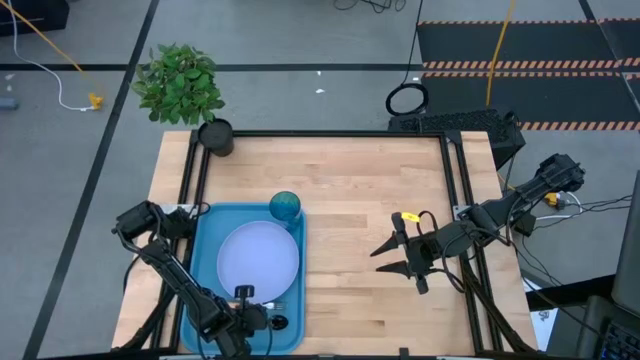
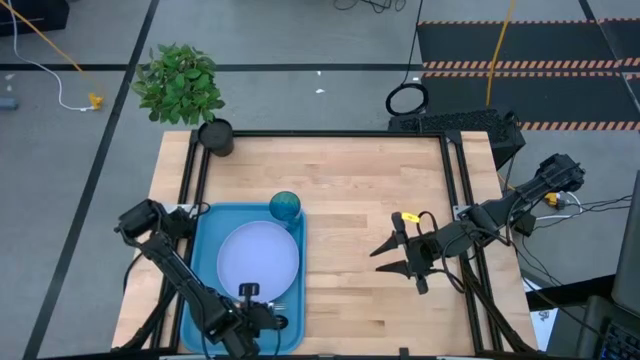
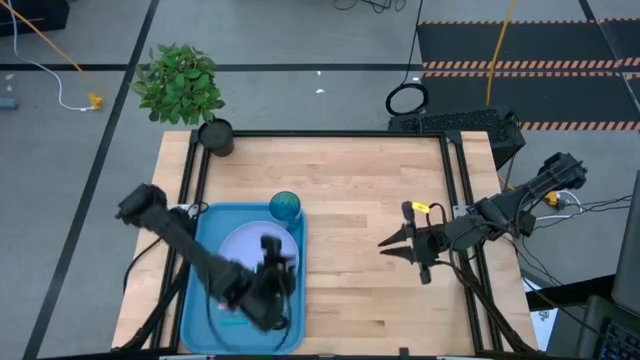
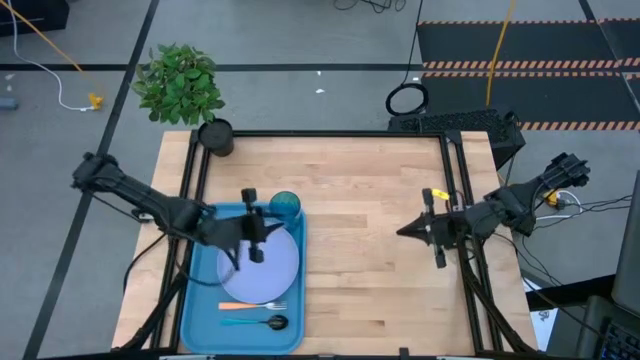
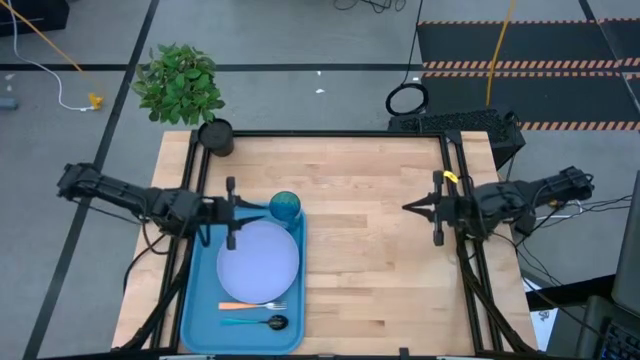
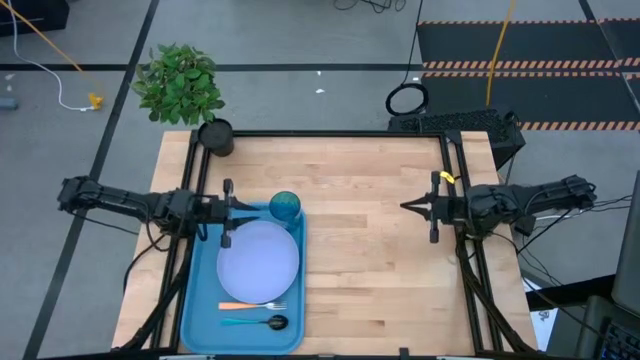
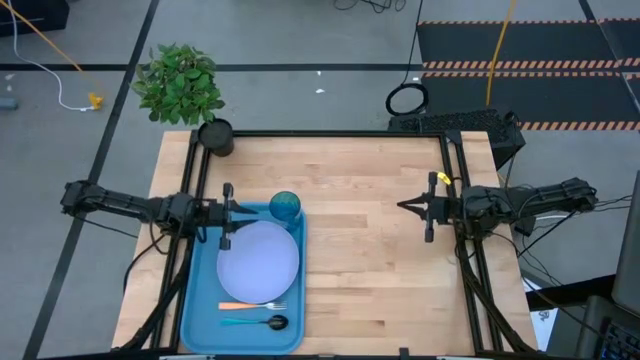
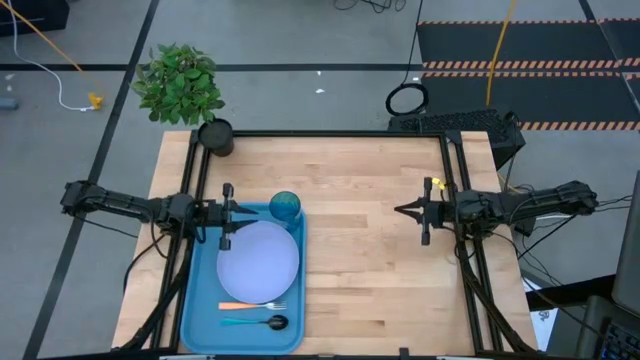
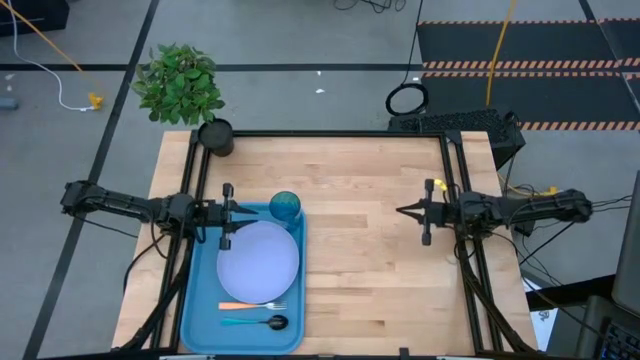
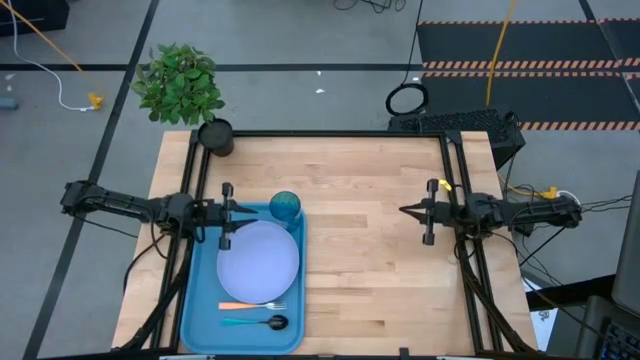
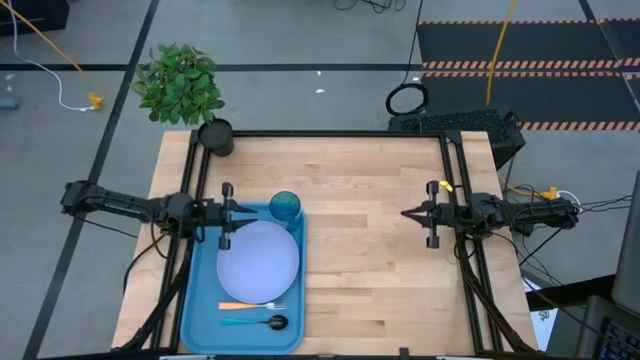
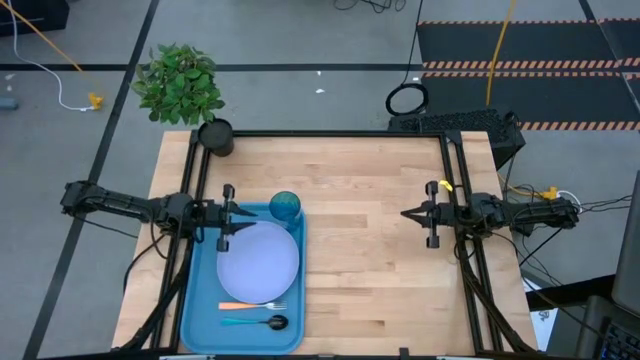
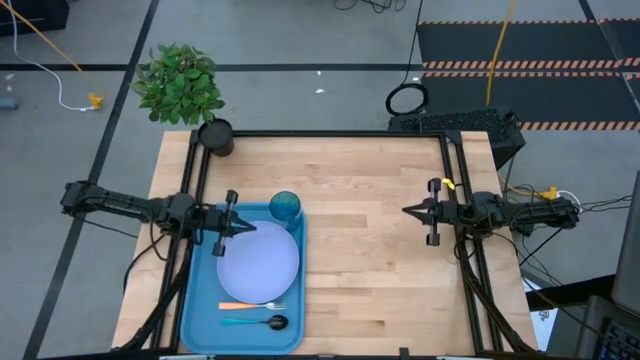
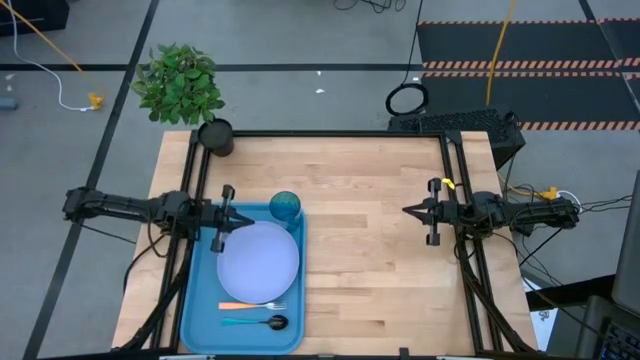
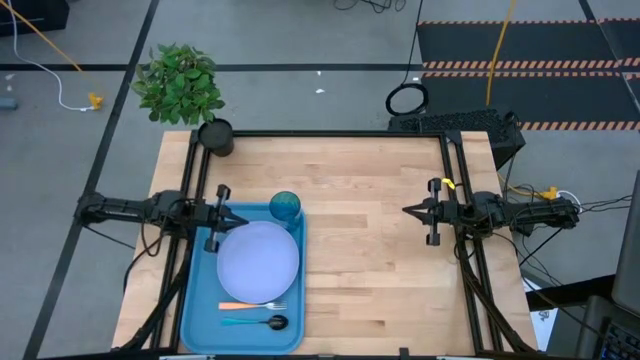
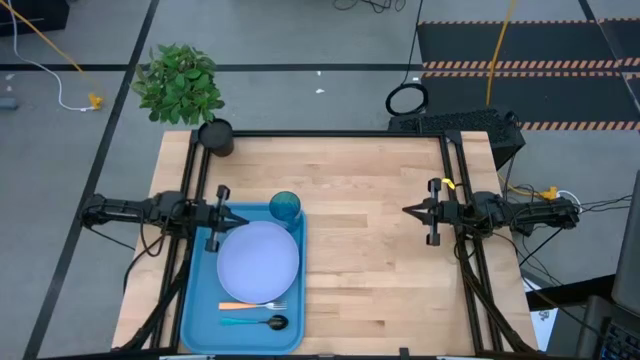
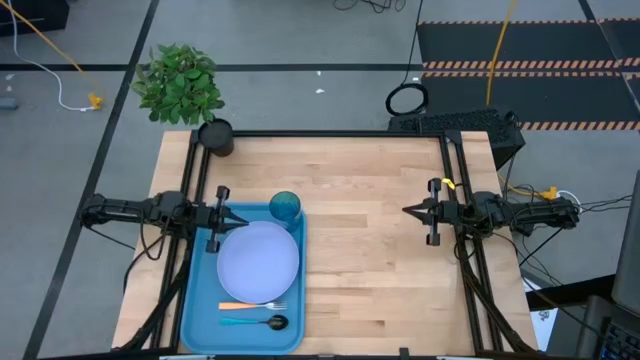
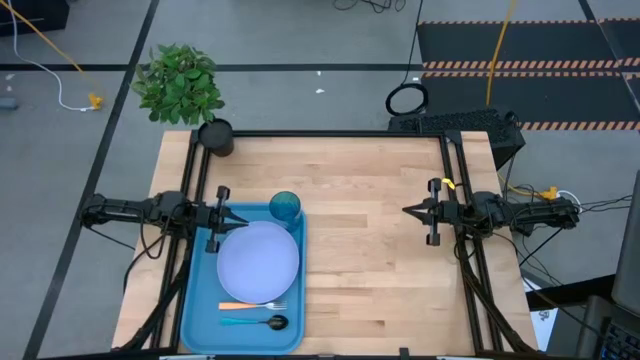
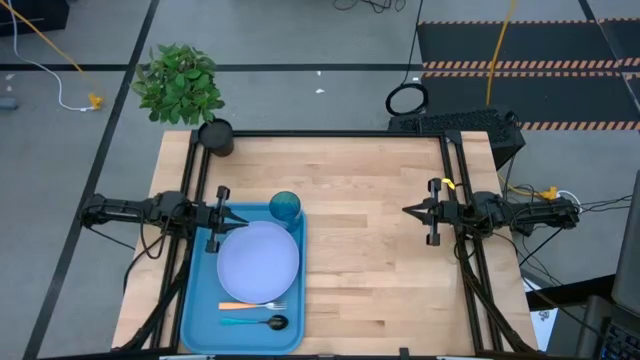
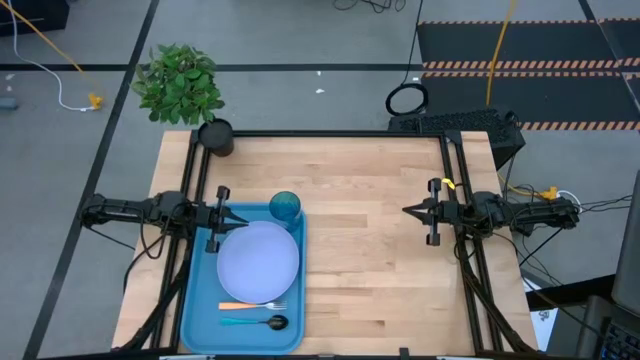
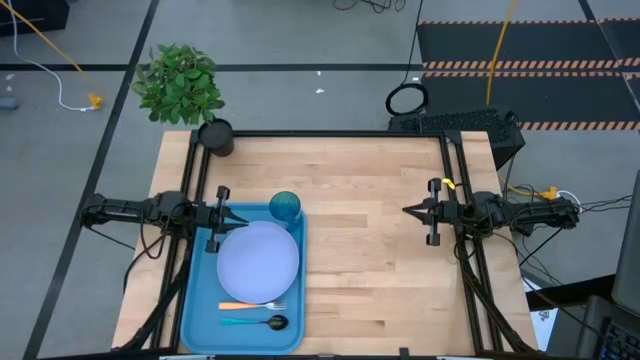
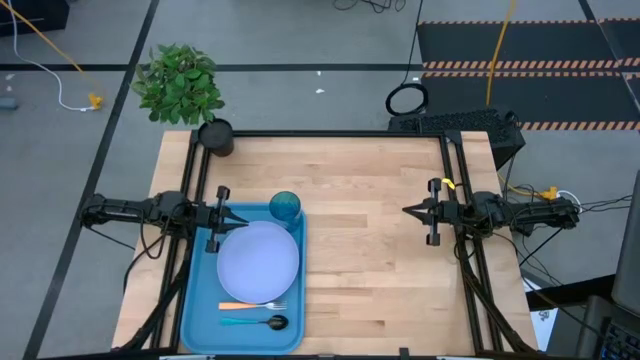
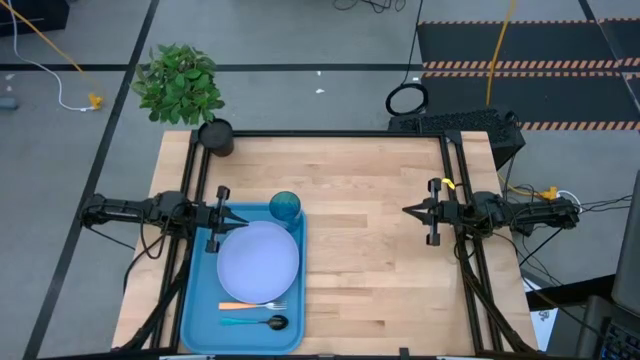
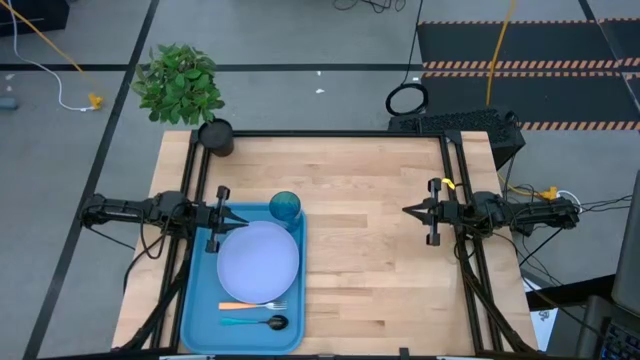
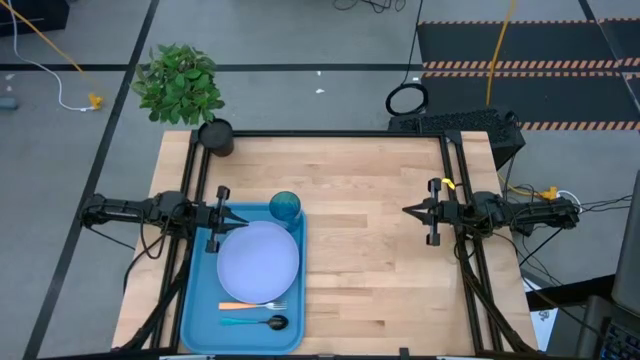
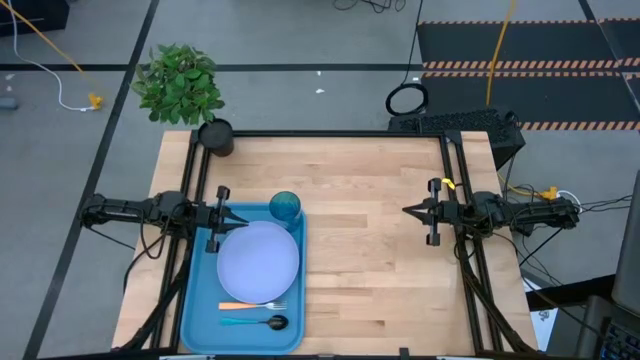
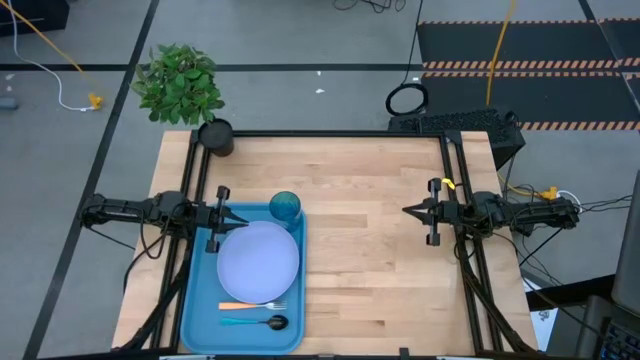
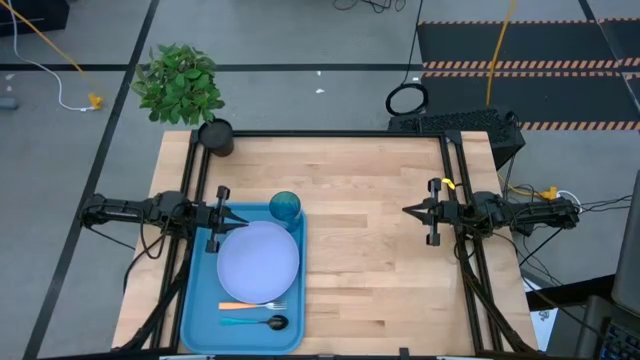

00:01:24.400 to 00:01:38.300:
Task: Pick and place plate/cup/fork/spoon on tray
Return to Home Position

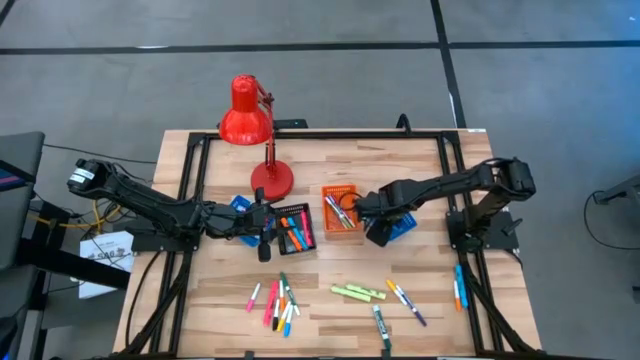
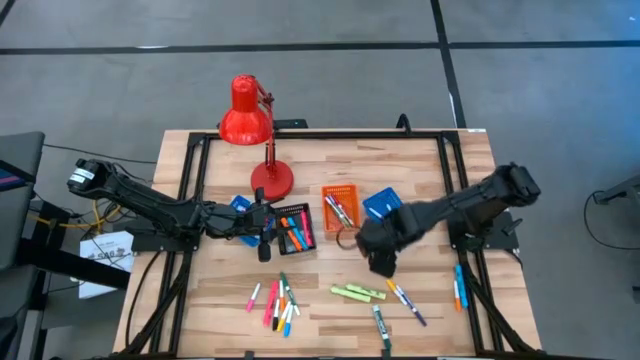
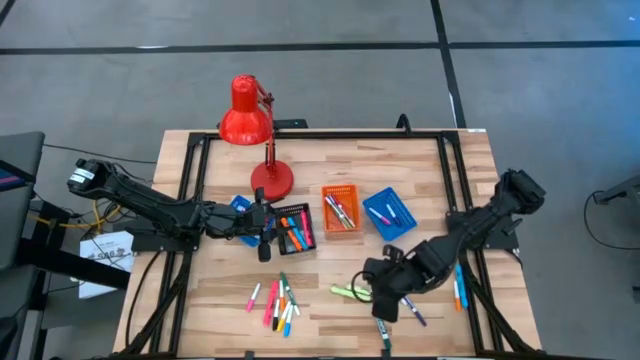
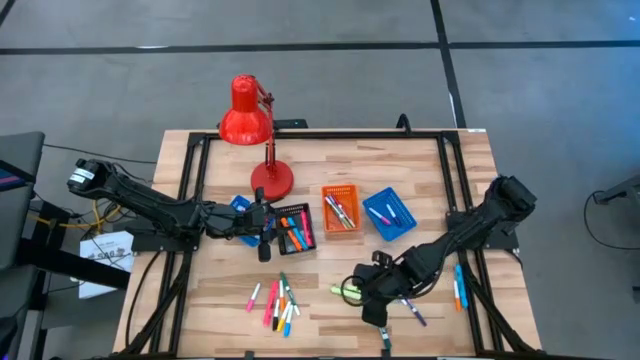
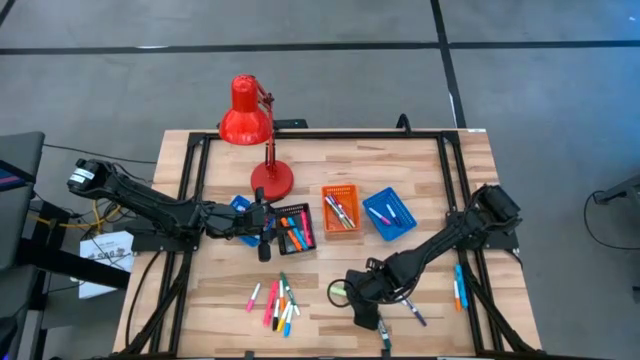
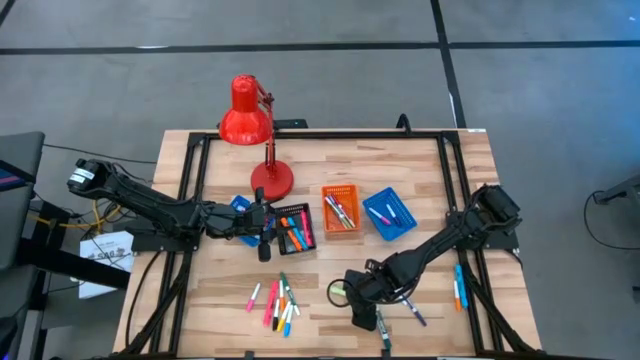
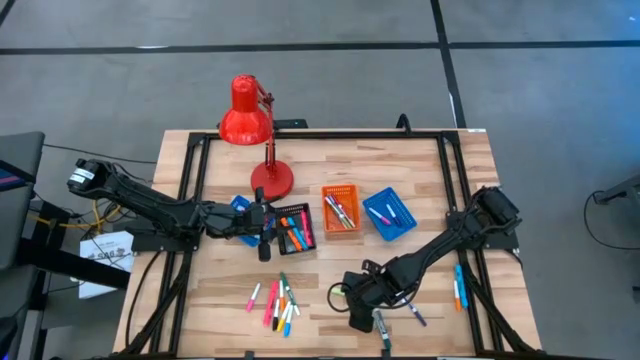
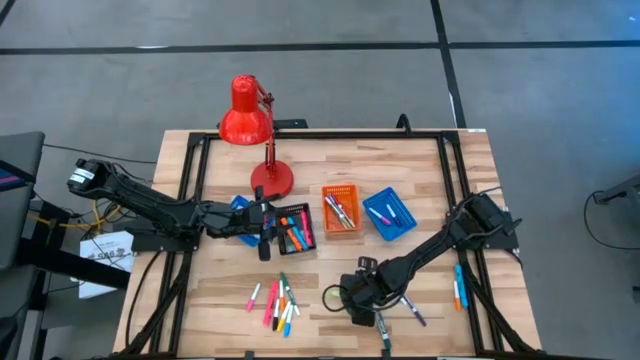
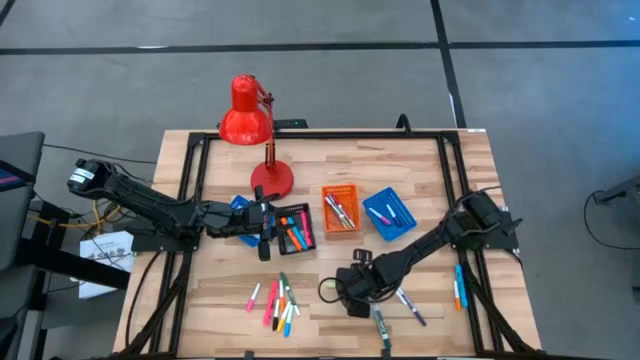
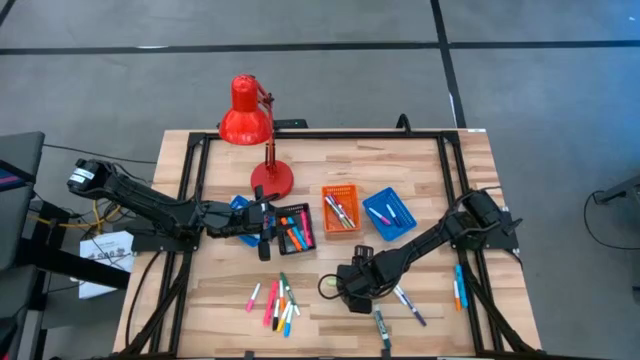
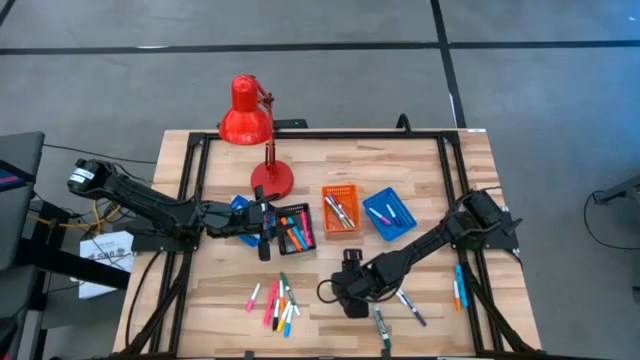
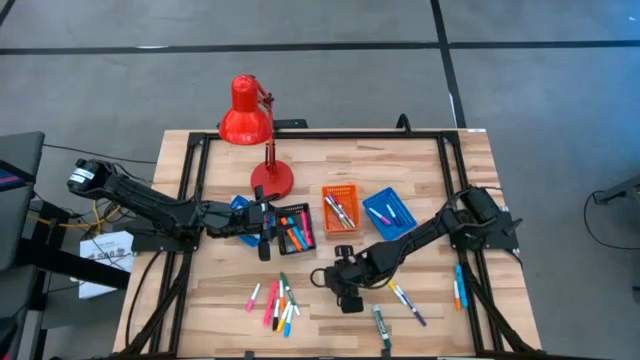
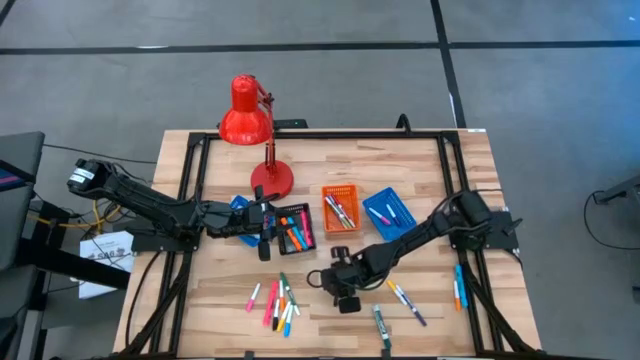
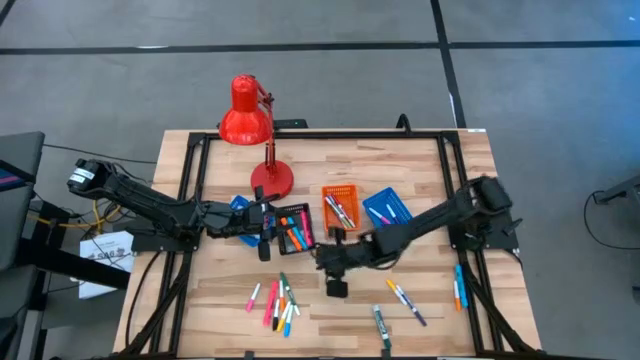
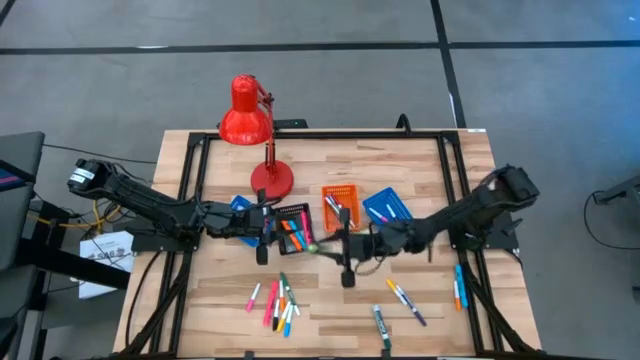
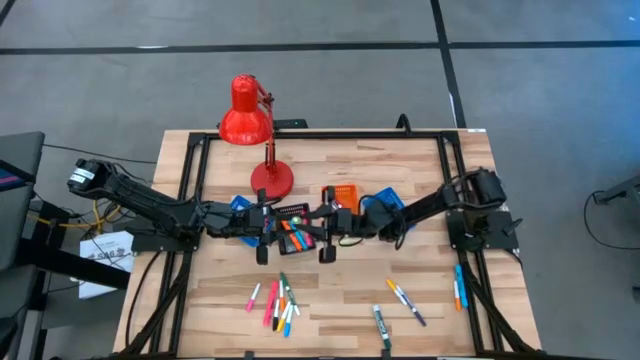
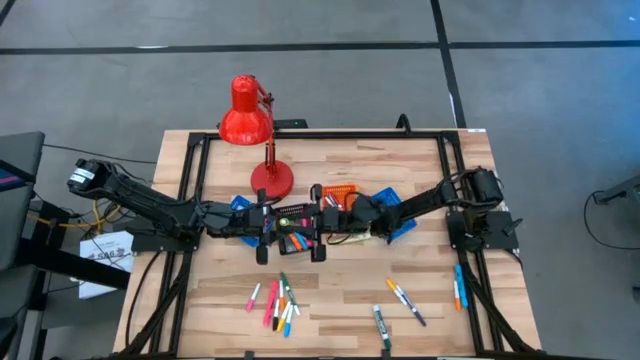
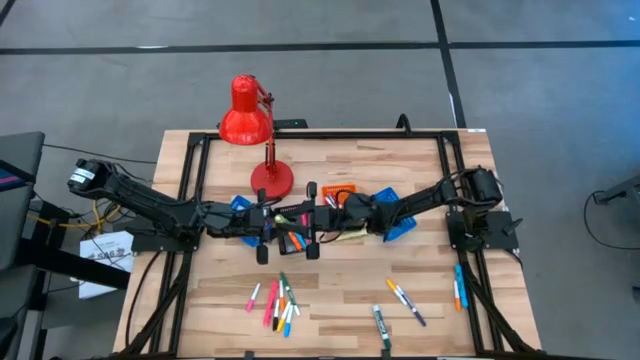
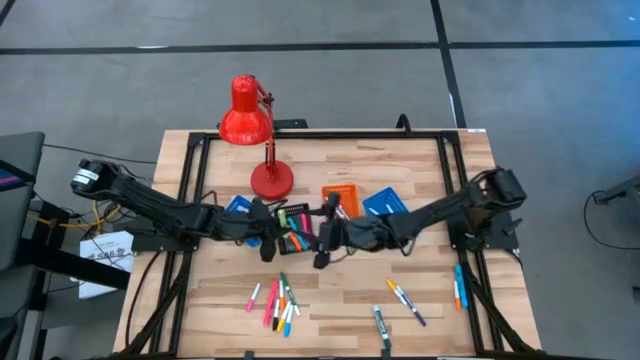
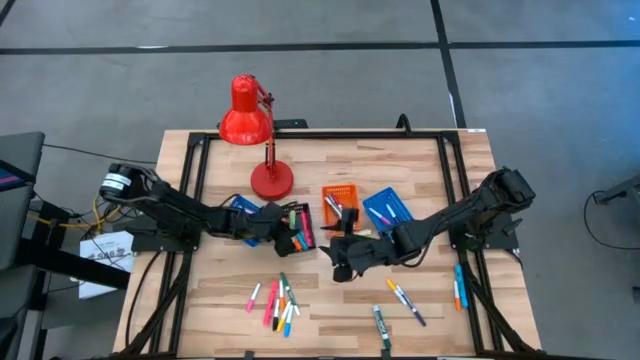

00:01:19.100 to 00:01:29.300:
Task: Pick & Place Markers
Put the bottom large green highlighter pen into the black basket
